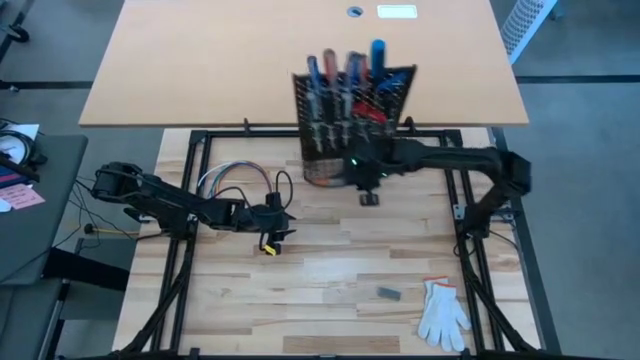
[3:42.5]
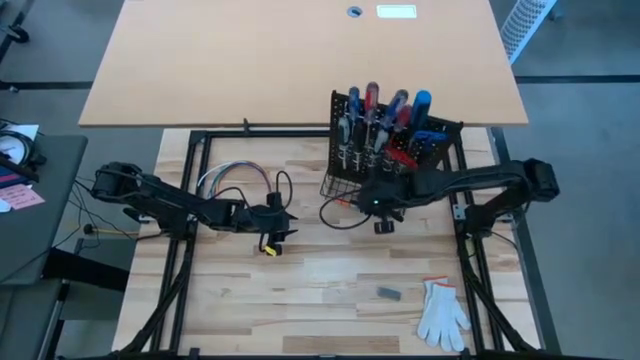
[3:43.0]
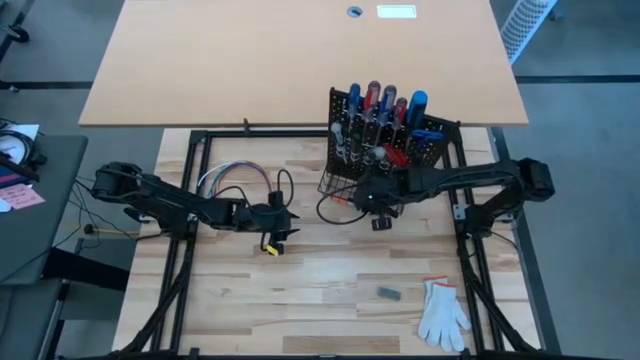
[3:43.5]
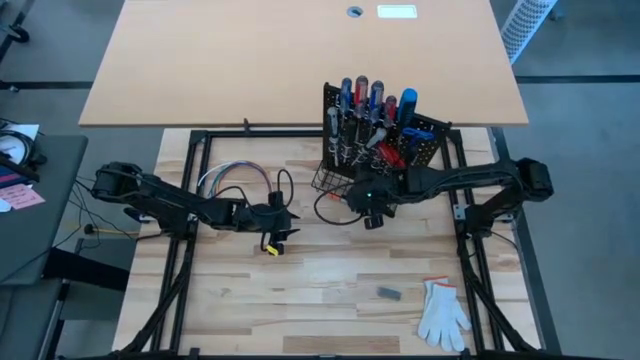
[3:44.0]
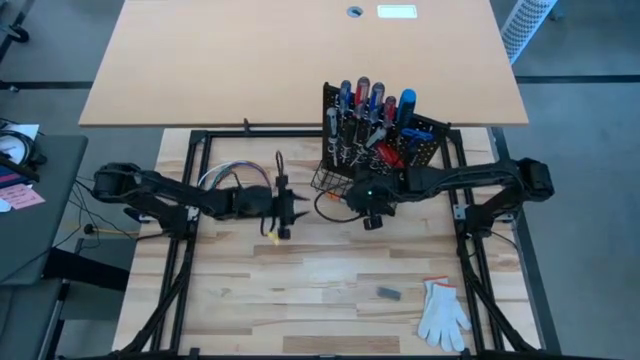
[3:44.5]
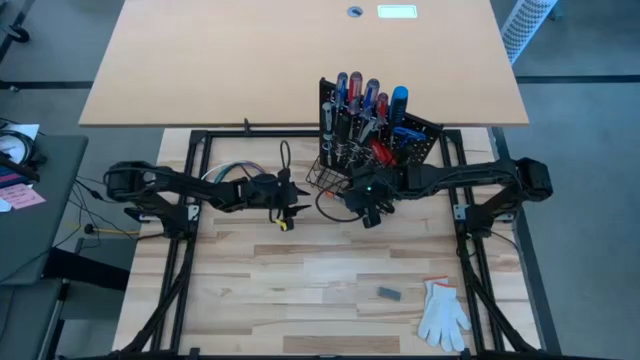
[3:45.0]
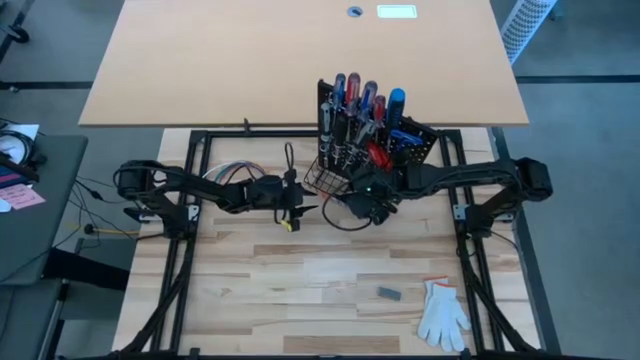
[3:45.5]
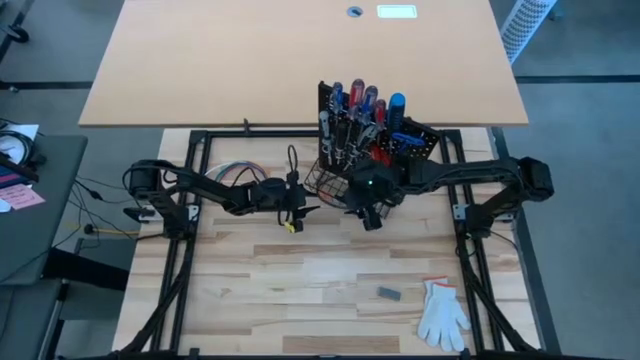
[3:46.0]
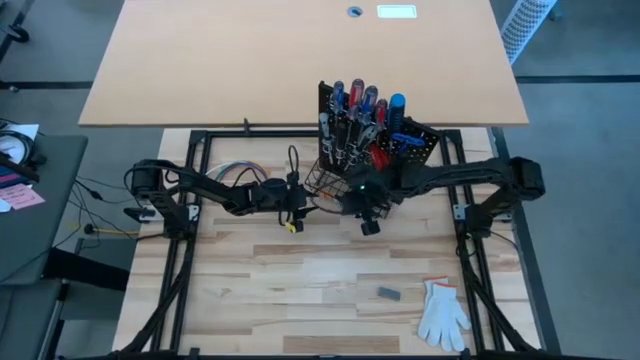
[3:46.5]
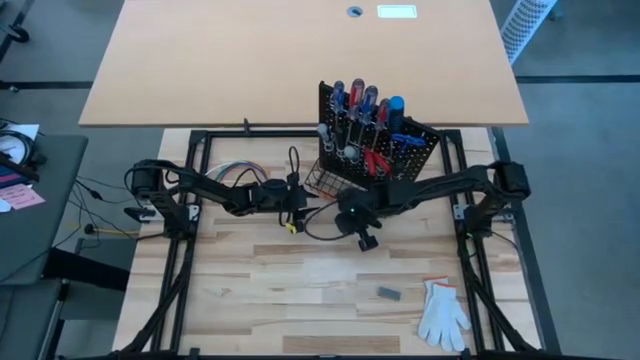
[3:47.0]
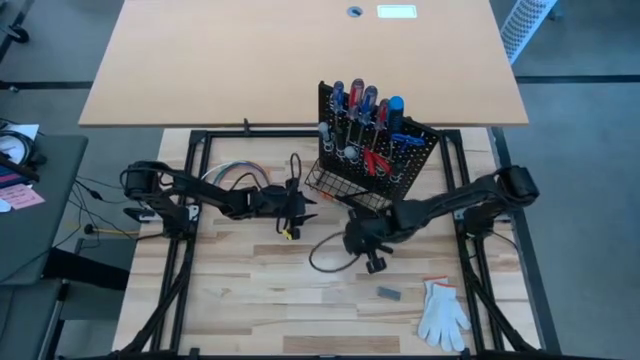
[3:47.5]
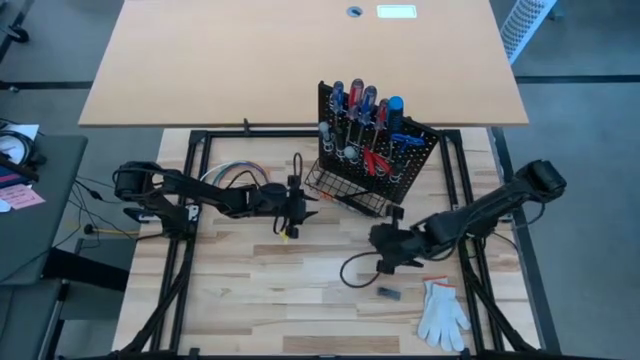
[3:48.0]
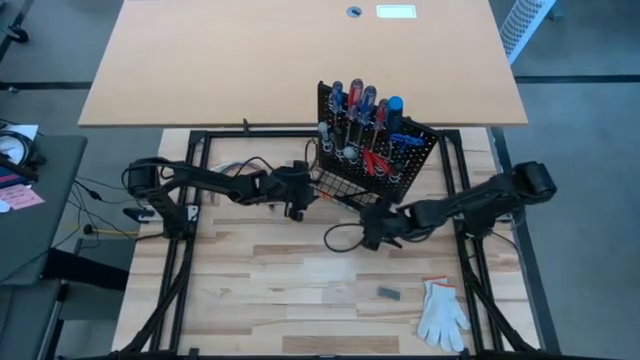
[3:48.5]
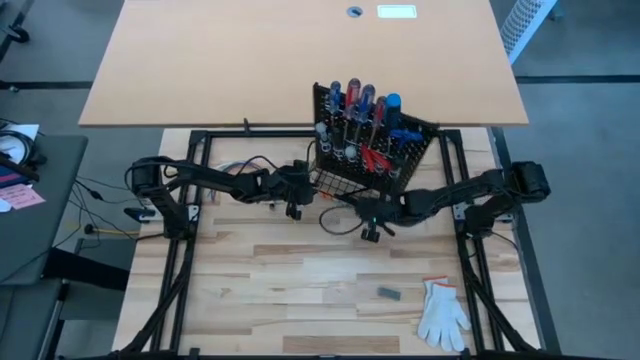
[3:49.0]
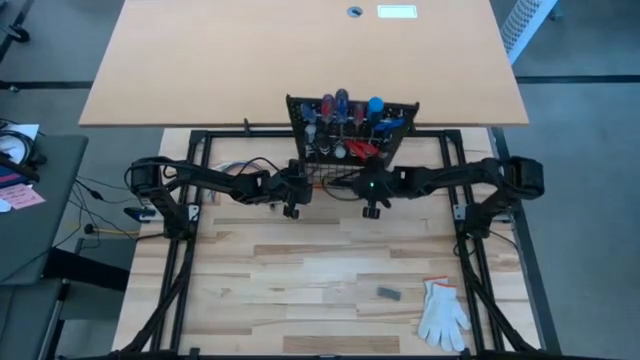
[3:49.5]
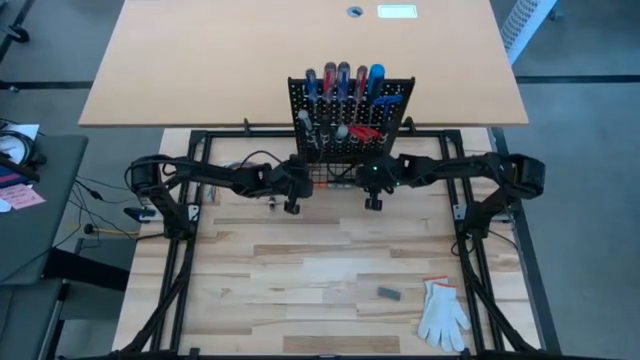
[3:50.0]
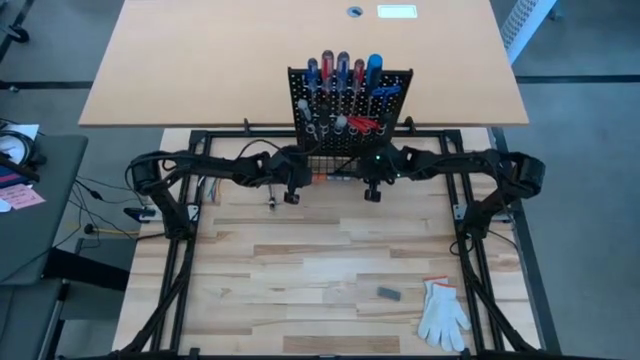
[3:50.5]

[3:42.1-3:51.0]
Task: Hang tools onto peg board
Adjust the black peg board

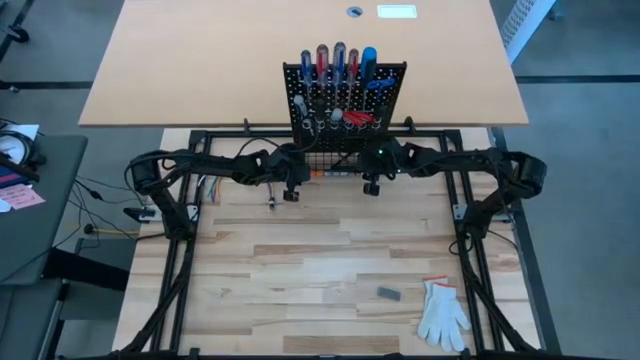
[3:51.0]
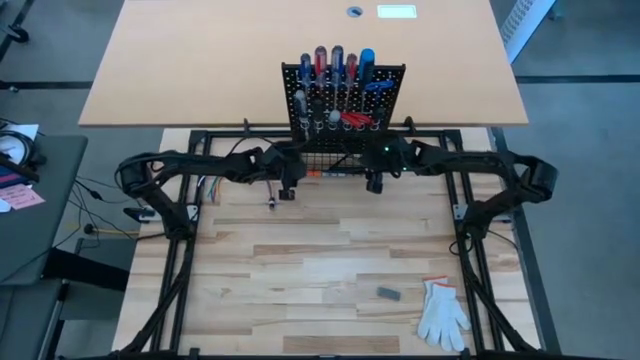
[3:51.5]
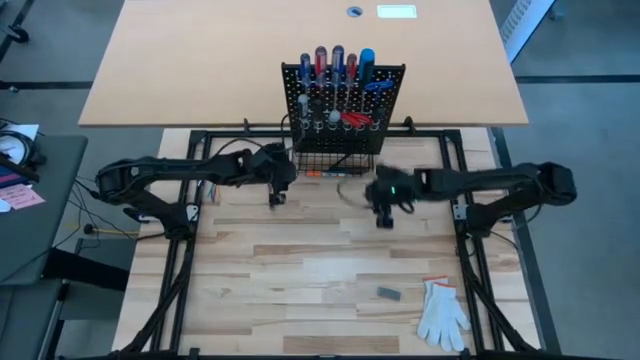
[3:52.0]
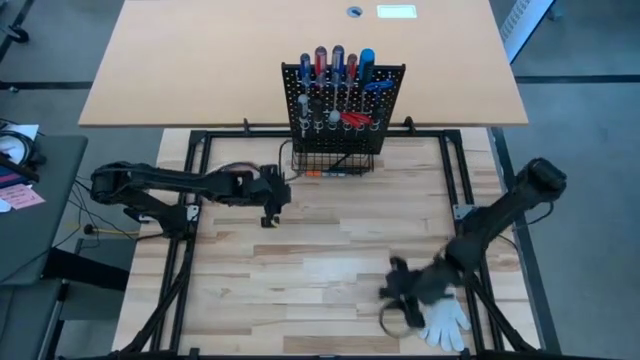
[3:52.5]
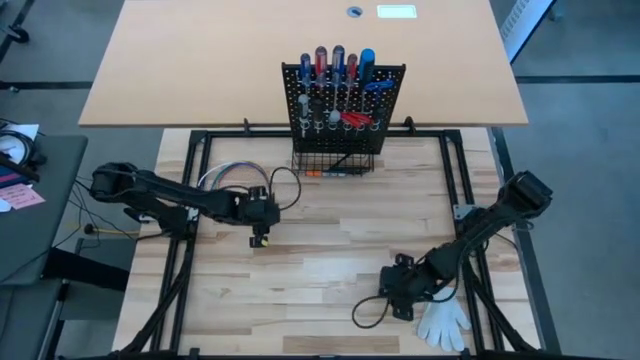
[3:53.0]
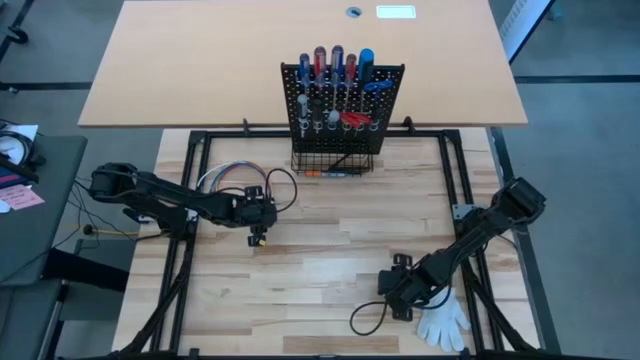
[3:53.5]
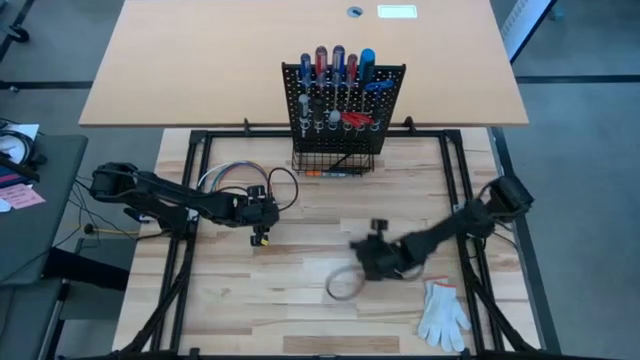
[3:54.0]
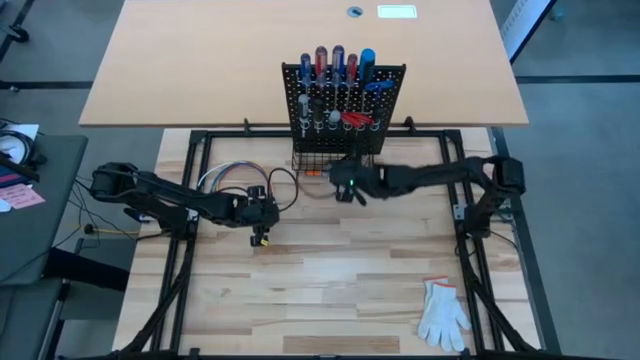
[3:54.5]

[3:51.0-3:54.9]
Put the black box cutter into the black basket

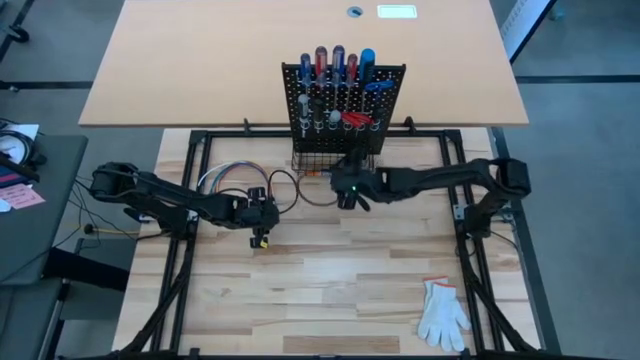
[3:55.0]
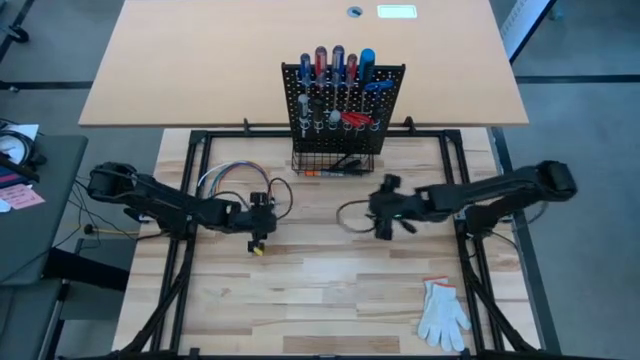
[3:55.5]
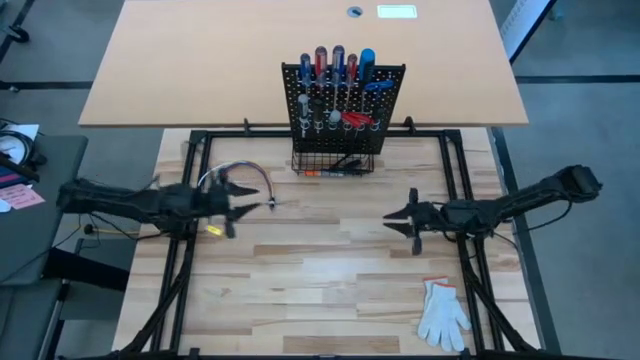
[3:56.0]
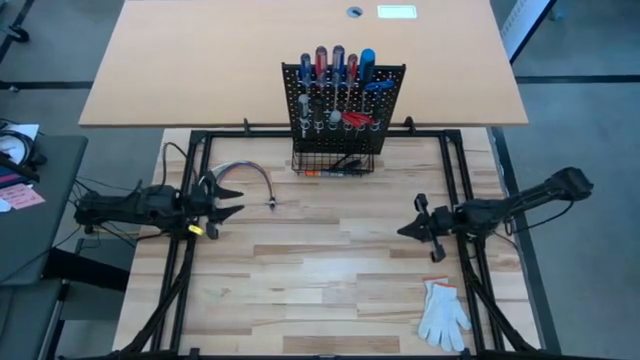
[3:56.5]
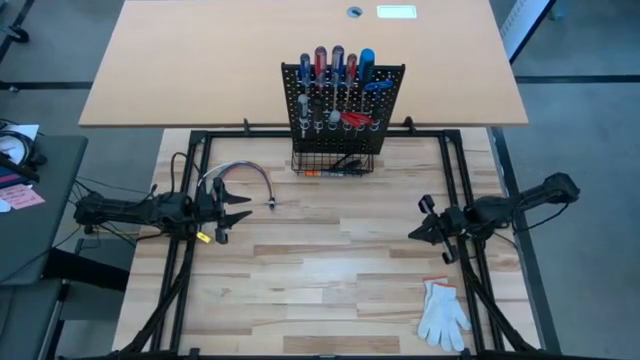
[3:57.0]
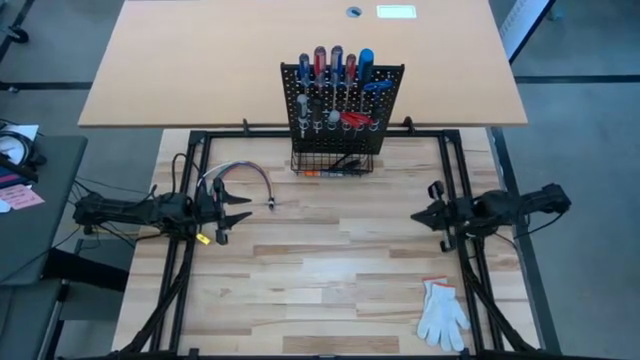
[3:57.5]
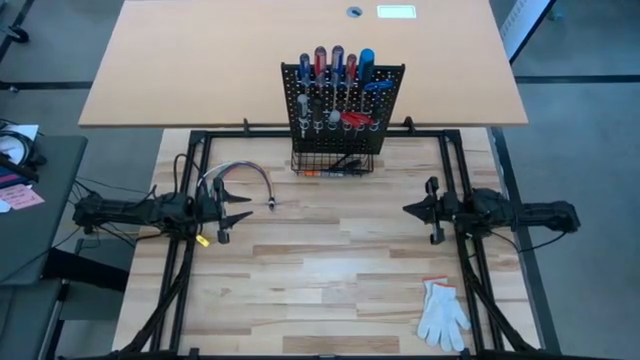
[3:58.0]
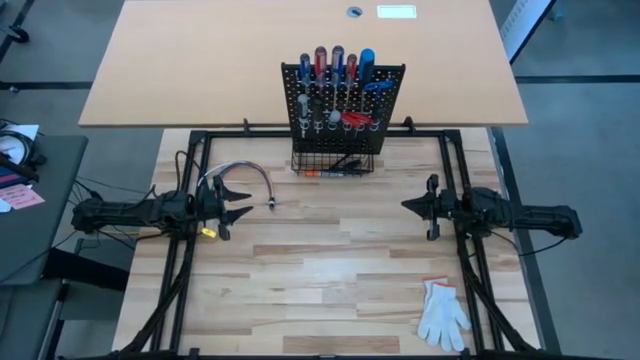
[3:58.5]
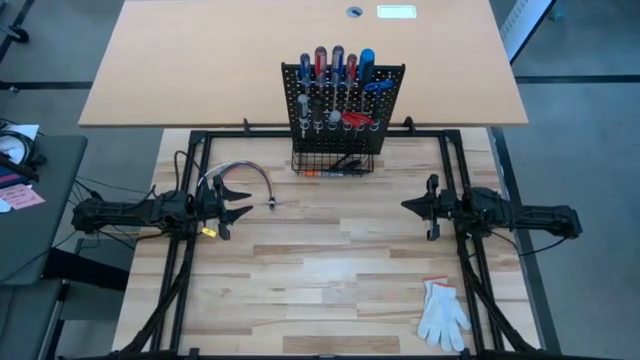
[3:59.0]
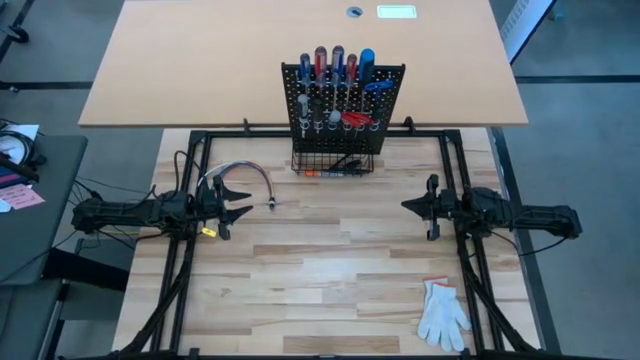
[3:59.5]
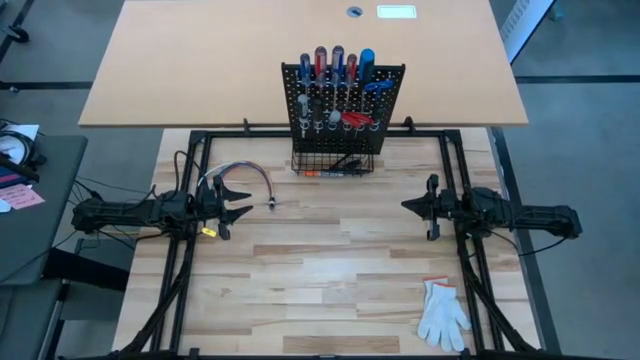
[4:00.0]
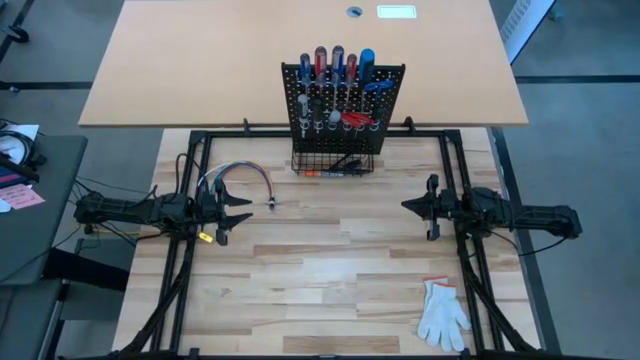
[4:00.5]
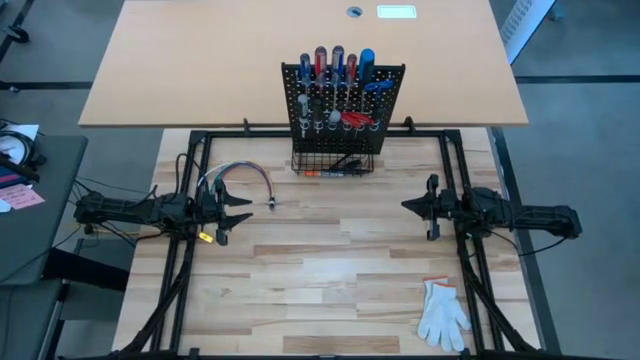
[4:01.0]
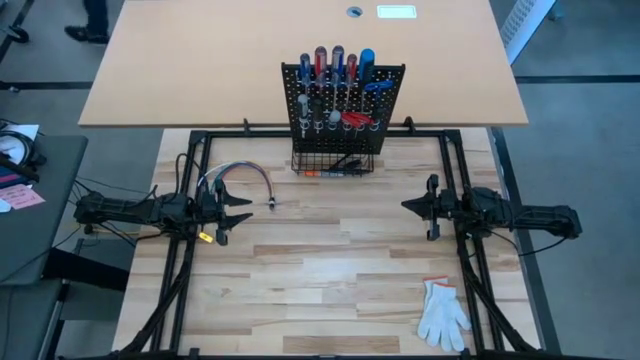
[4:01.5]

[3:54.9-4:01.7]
Return to Home Position

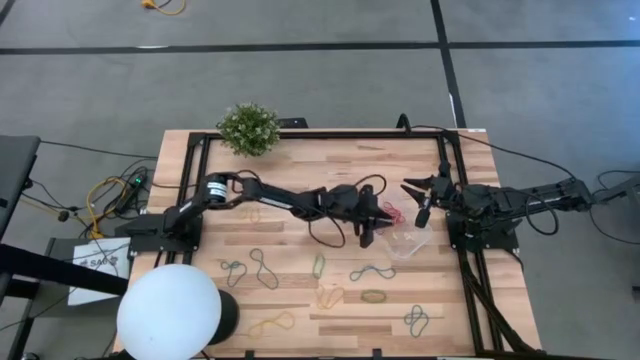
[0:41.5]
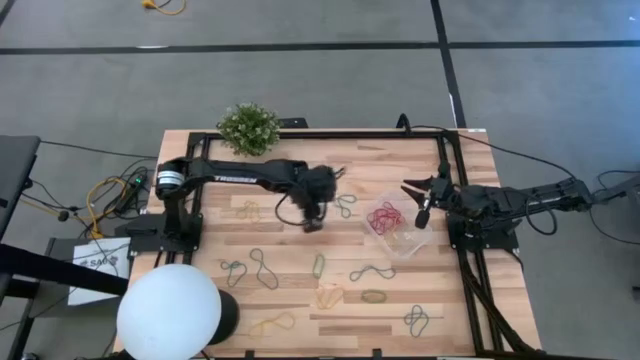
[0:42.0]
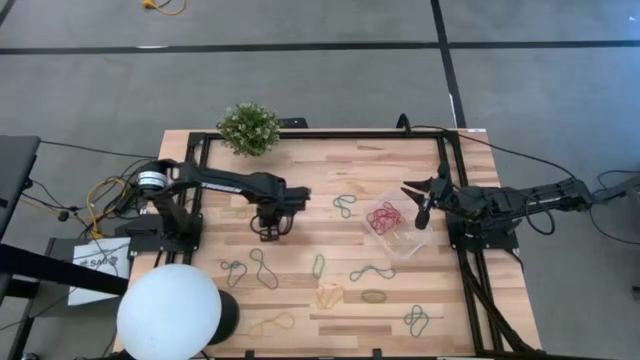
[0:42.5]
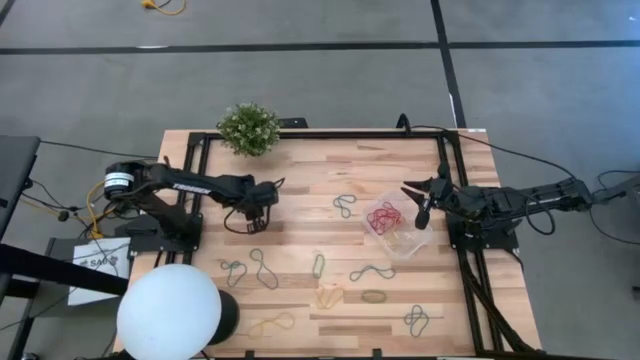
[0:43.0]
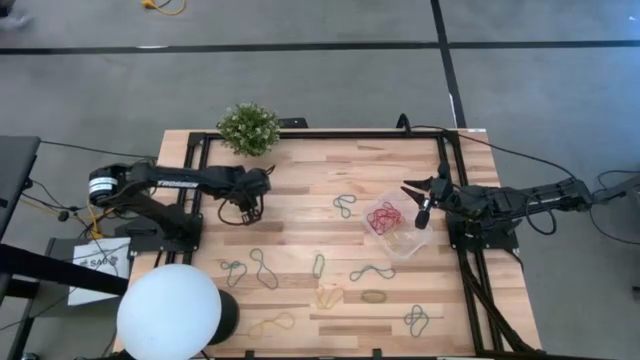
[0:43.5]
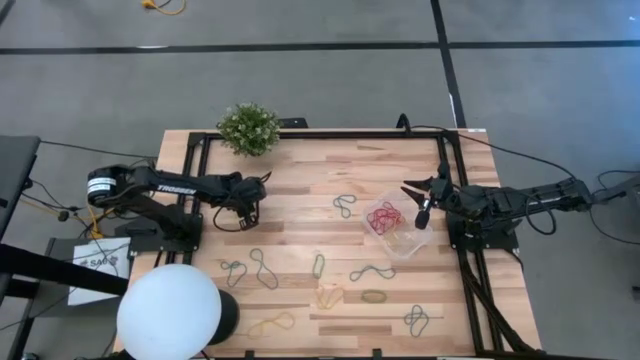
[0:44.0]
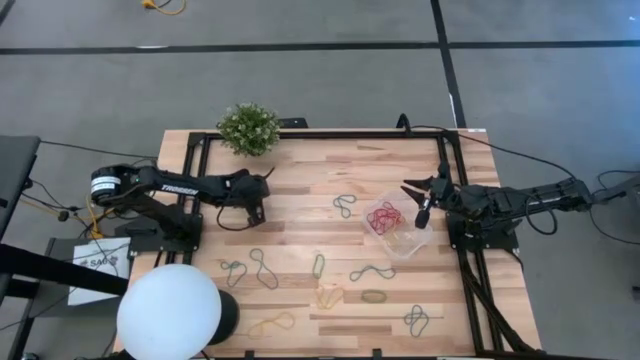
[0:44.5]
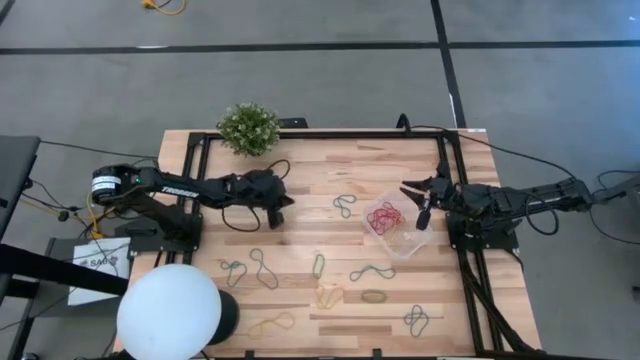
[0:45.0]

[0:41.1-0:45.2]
Task: Pick and place items into bin
Put the yellow rubber band into the transparent bin
